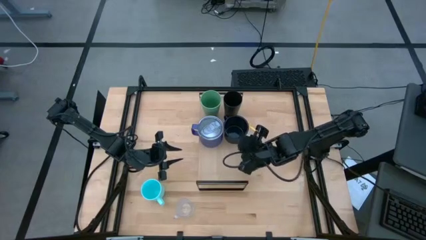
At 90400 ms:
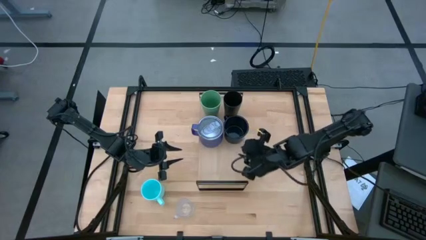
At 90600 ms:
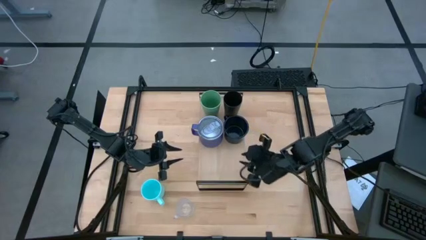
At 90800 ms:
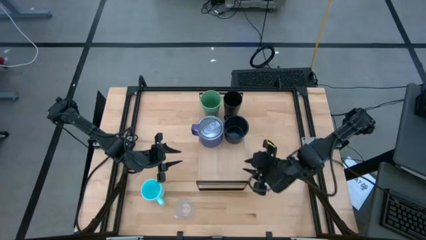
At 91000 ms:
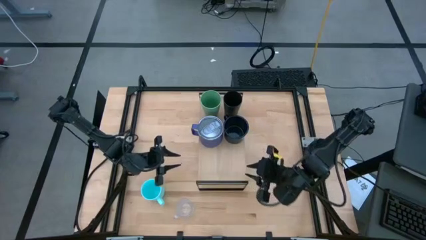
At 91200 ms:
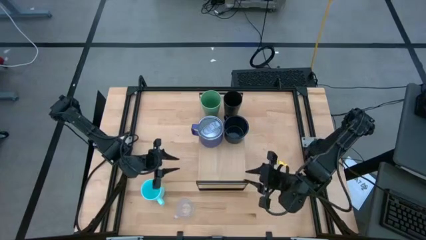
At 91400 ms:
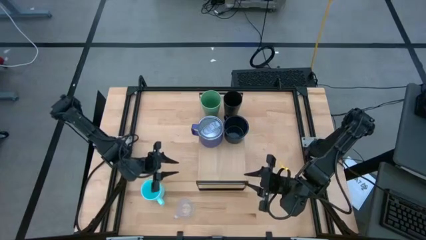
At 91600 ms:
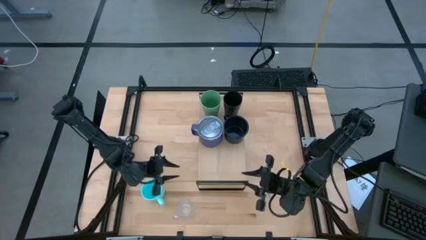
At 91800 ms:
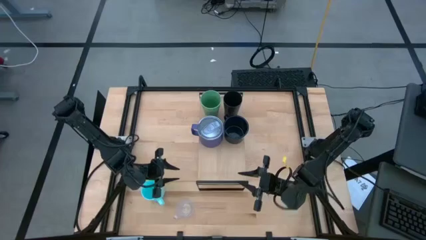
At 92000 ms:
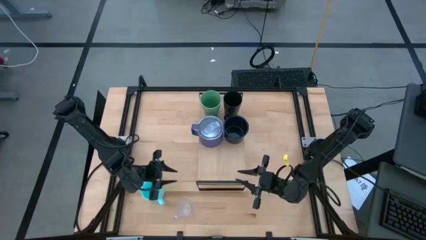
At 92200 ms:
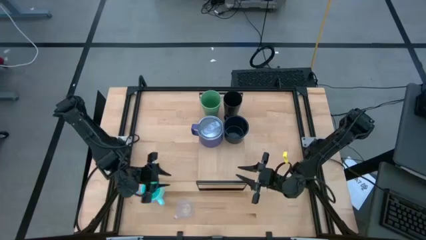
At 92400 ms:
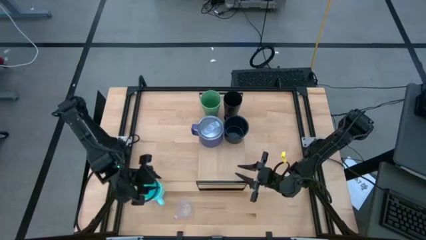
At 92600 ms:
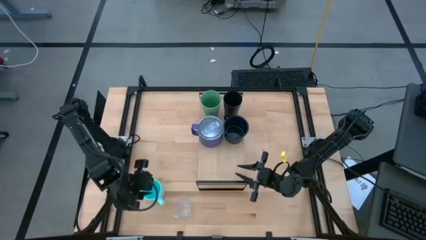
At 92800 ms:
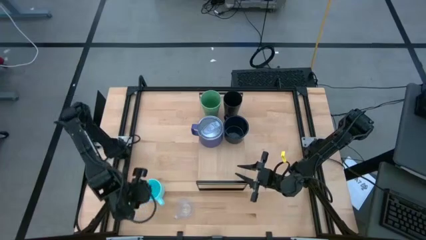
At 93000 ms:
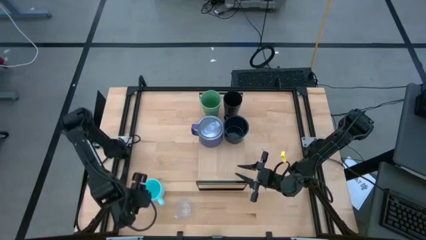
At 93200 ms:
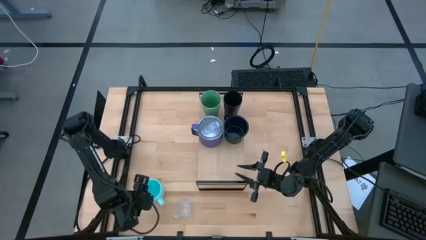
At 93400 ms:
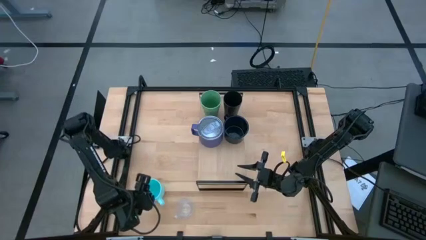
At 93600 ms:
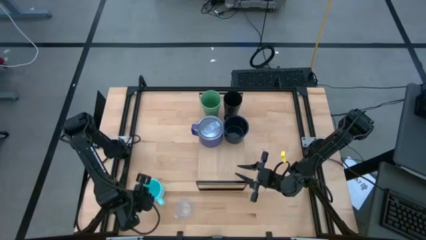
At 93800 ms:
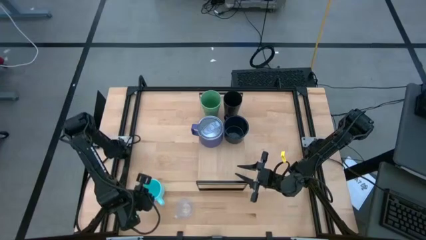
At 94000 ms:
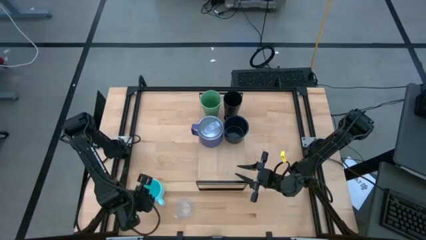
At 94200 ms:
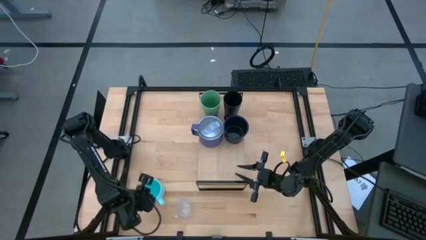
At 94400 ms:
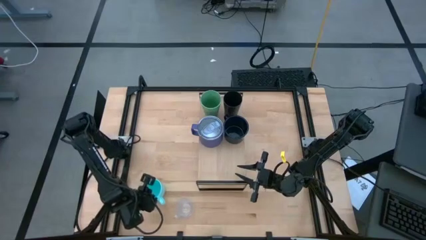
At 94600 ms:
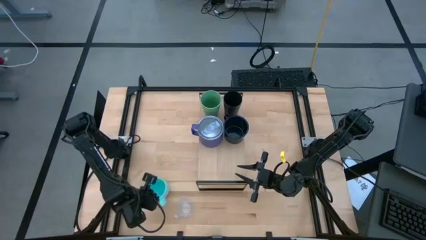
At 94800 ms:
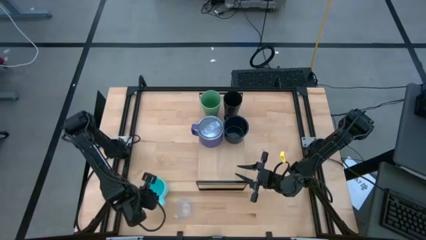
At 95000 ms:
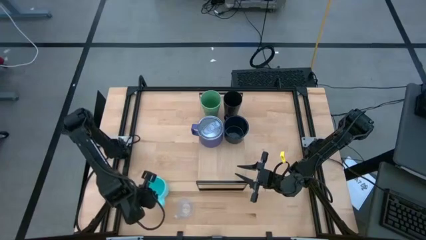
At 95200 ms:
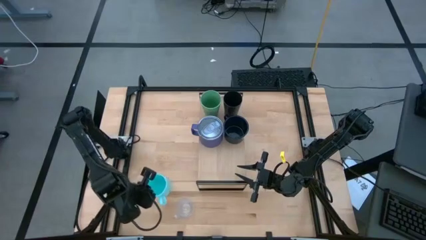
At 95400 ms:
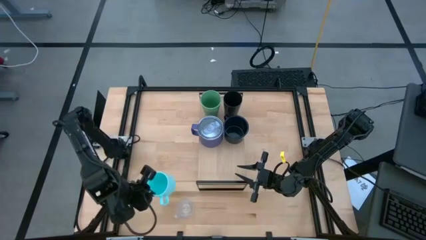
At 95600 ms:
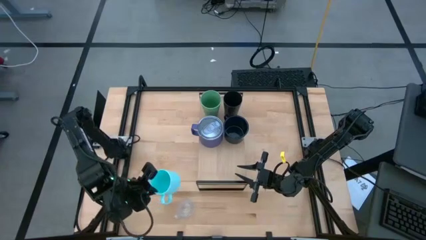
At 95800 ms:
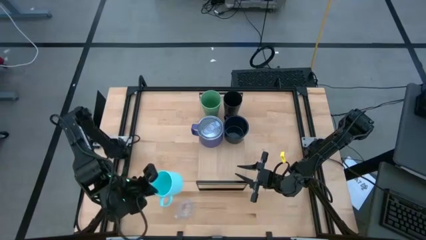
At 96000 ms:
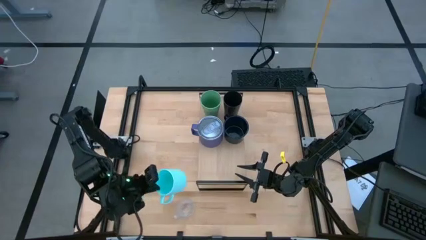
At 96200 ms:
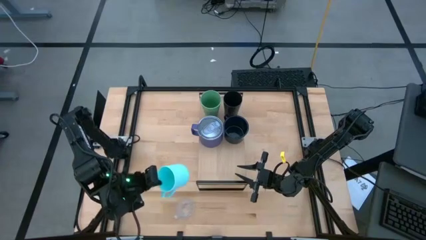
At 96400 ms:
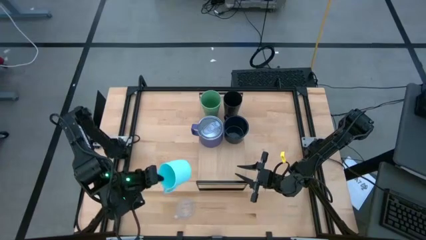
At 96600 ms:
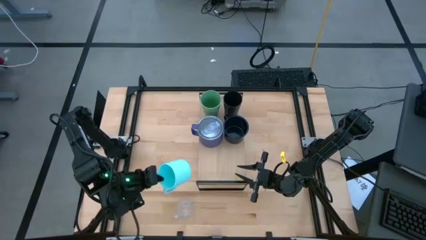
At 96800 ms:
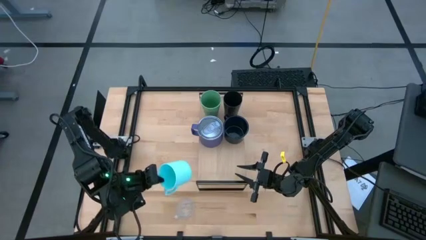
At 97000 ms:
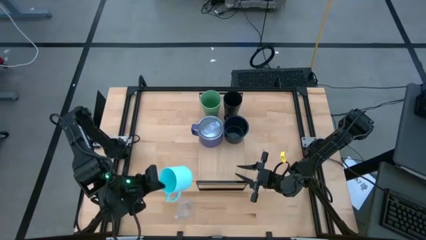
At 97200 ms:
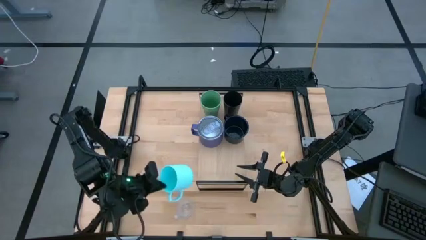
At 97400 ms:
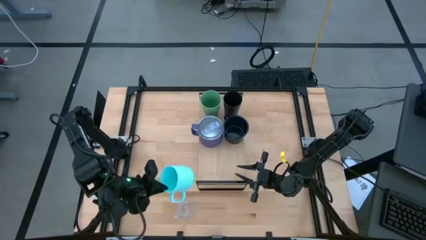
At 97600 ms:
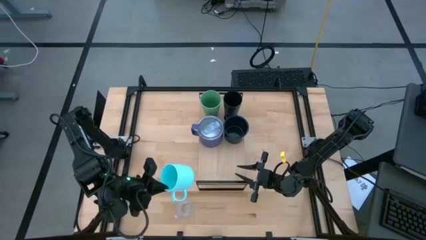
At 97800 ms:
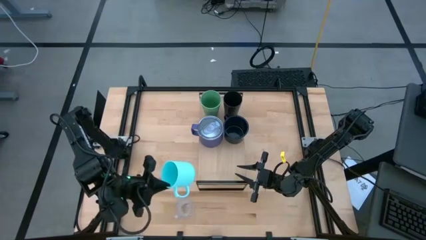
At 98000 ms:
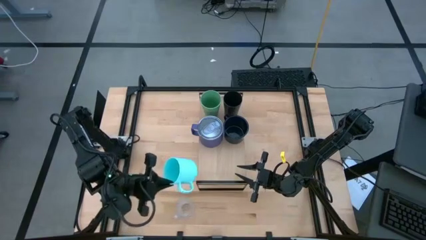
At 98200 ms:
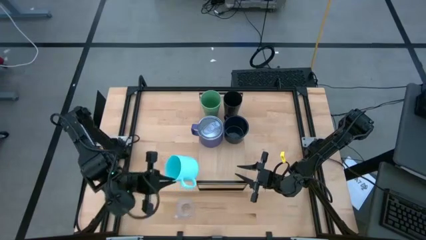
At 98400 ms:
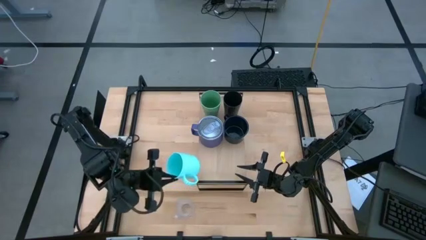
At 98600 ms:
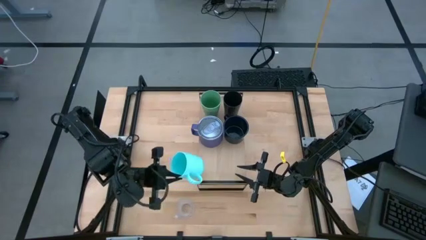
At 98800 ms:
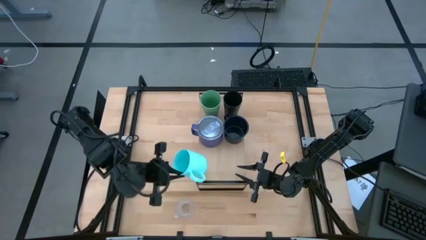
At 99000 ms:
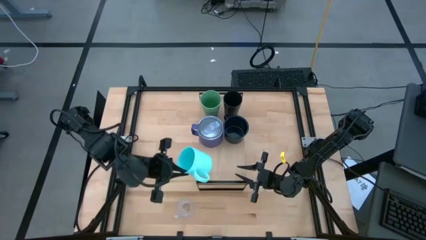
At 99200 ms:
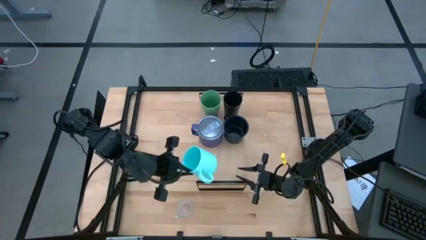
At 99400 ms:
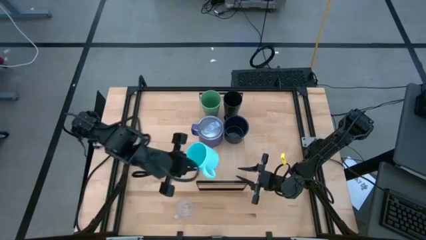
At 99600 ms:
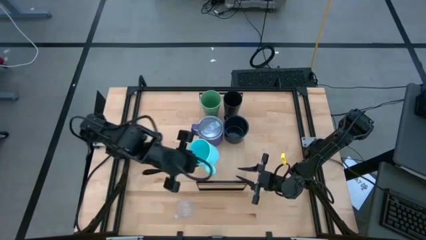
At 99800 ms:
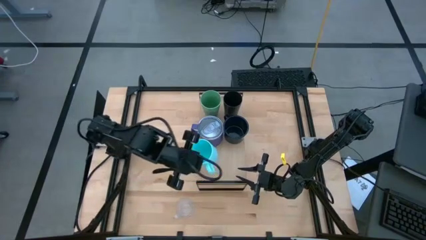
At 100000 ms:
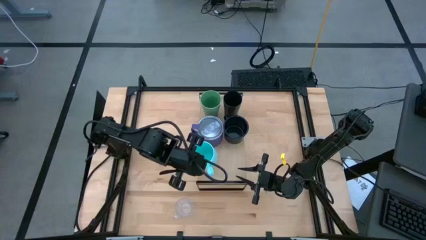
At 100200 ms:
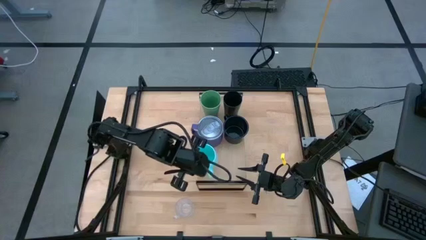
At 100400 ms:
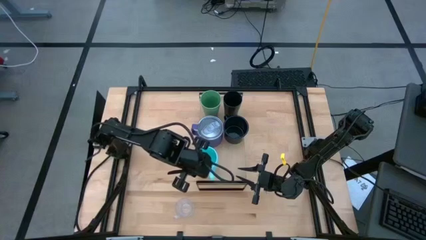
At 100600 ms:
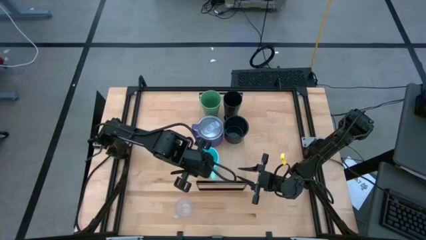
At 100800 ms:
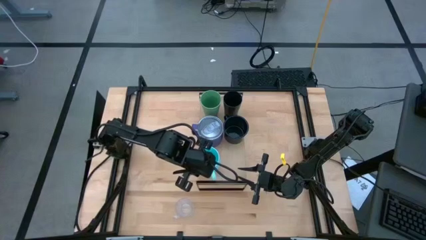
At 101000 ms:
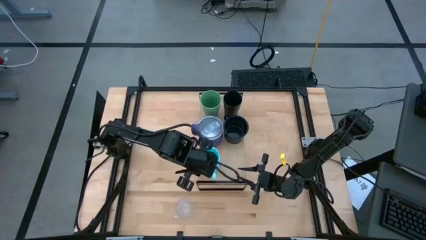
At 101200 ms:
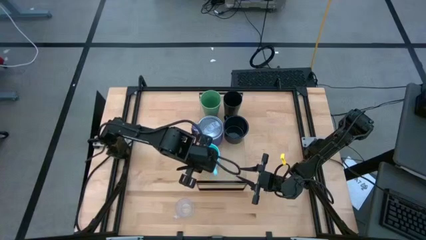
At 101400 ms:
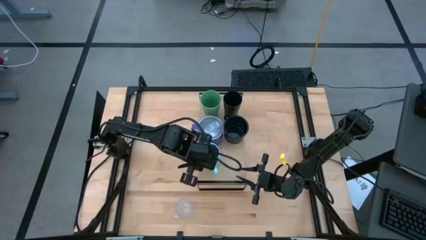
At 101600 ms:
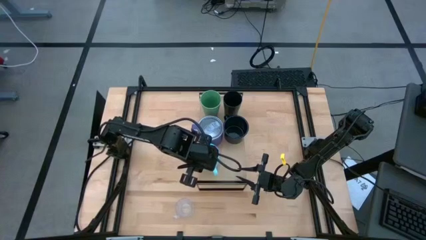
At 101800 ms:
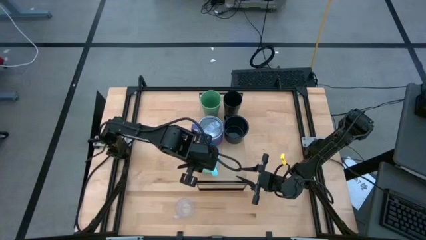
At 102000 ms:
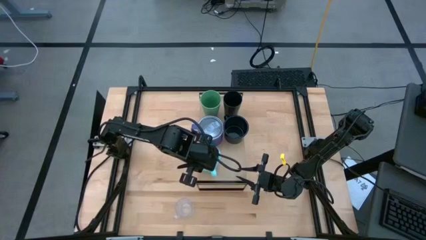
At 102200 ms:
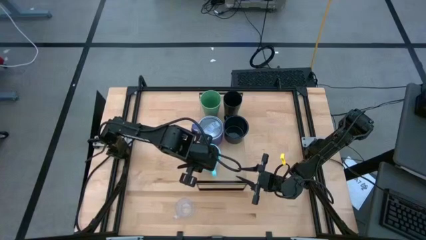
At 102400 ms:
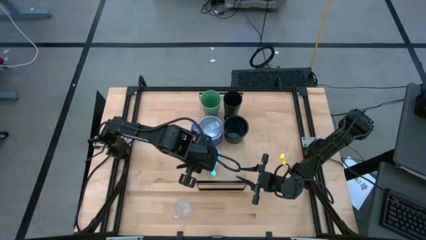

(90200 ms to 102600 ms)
Task: Stack small to large cups/mugs on shelf
Put the blue mug on the shelf

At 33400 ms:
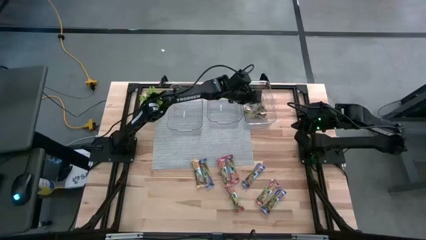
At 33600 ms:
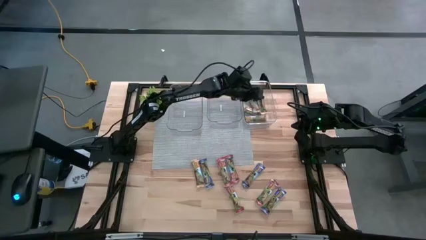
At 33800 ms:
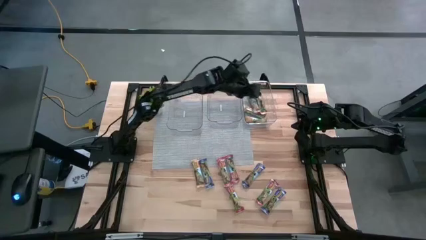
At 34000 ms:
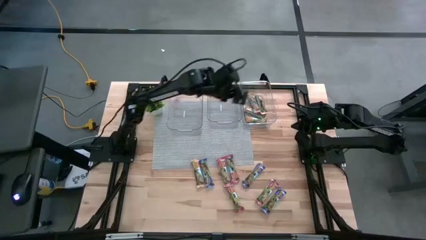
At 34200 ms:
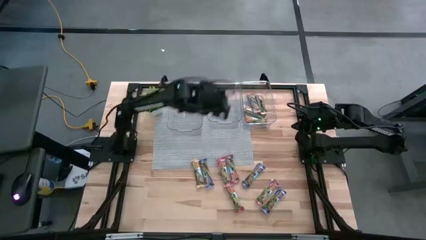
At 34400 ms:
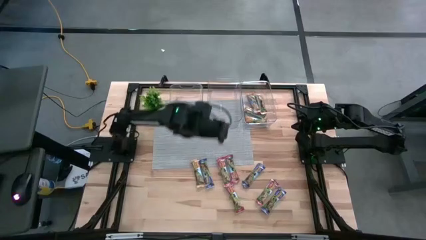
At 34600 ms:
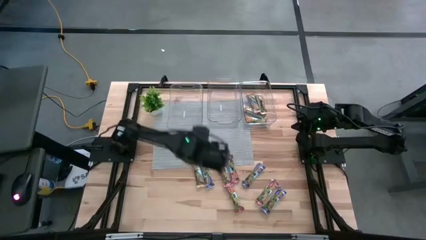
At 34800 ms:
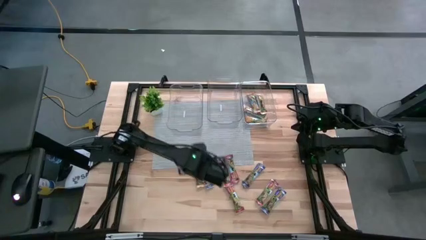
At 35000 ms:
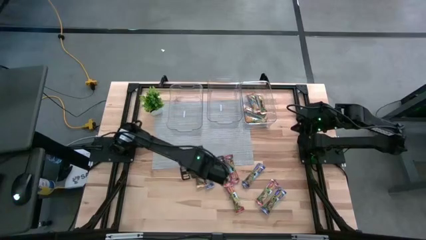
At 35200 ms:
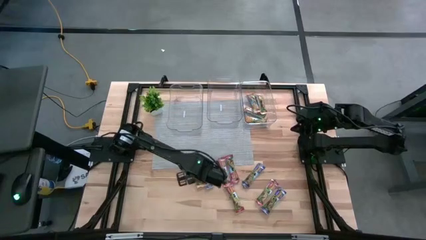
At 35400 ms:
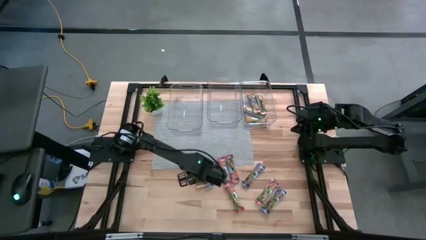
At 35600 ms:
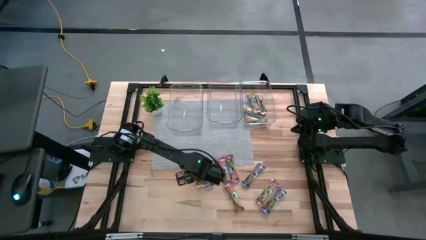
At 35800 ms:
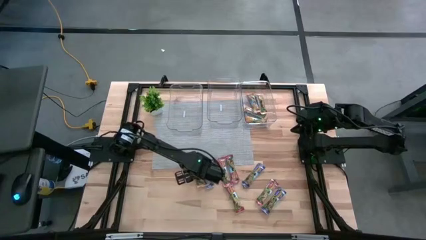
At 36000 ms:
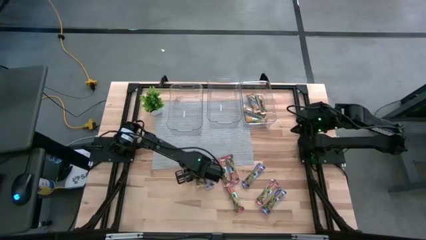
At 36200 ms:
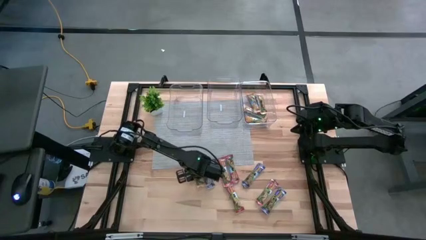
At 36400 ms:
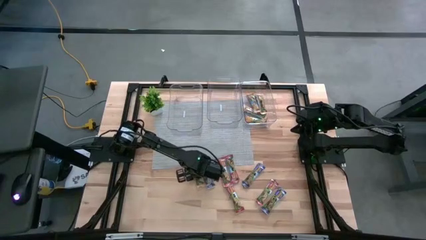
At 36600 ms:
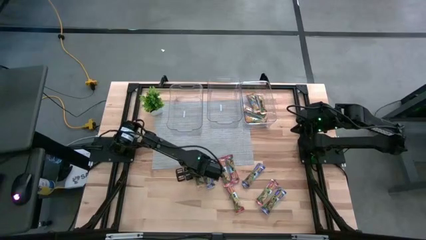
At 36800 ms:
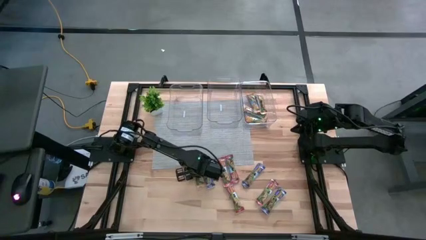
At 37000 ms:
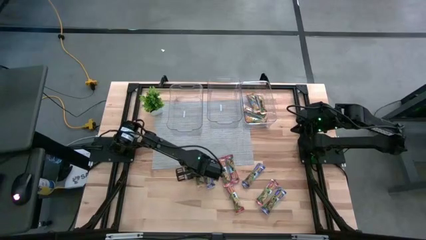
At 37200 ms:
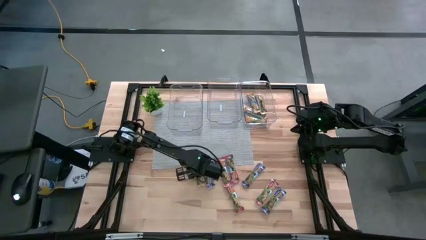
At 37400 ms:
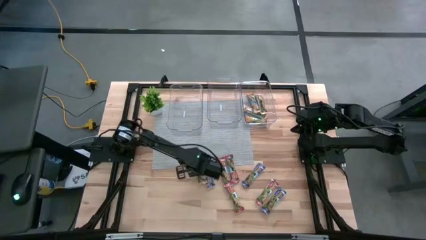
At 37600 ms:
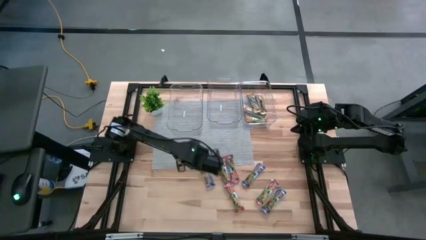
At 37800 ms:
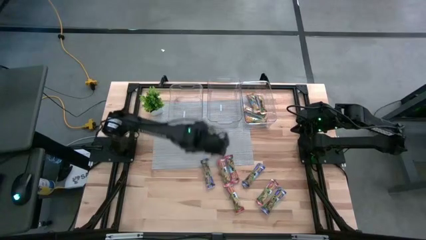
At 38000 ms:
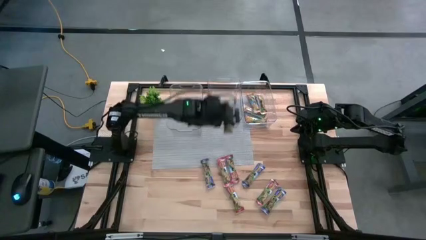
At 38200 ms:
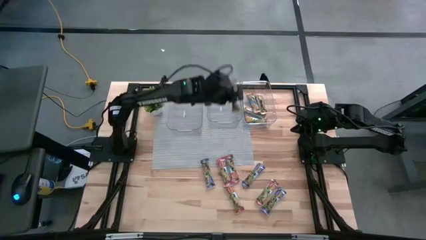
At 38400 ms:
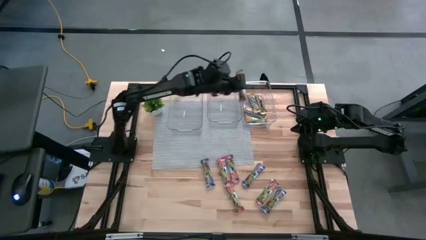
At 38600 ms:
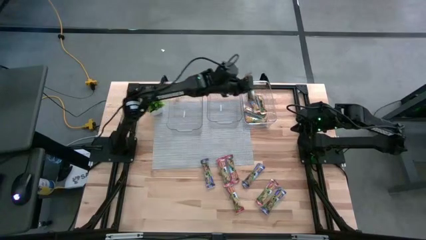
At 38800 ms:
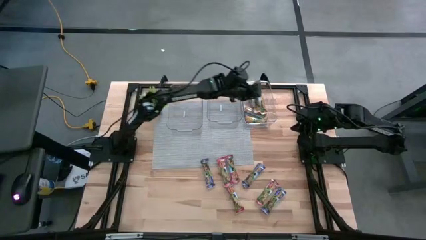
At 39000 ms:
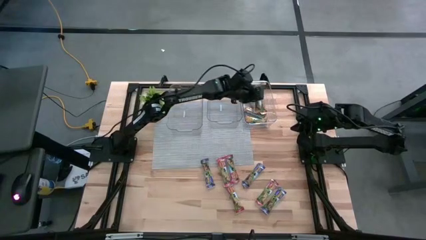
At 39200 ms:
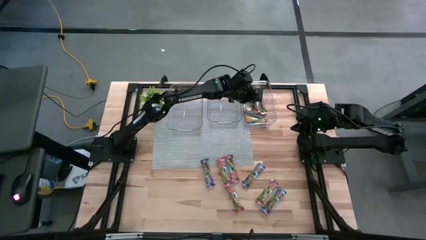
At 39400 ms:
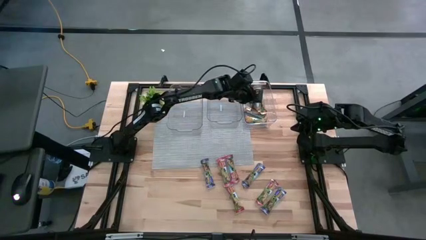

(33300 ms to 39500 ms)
Task: Pick and place Granola Bars by type
Put the yellow granola bar into the right transparent bin
